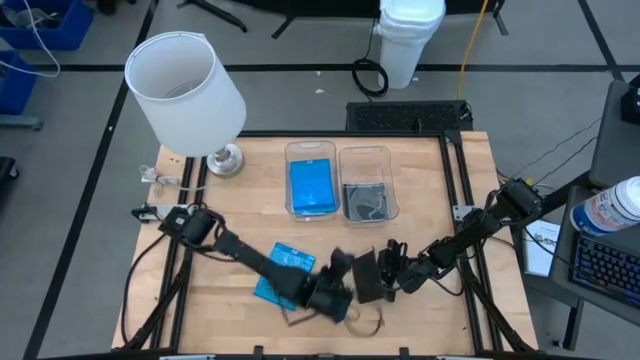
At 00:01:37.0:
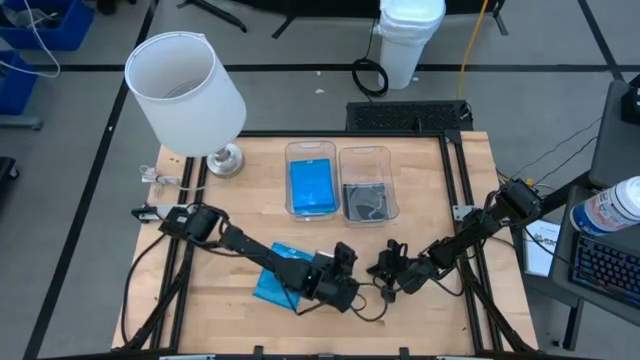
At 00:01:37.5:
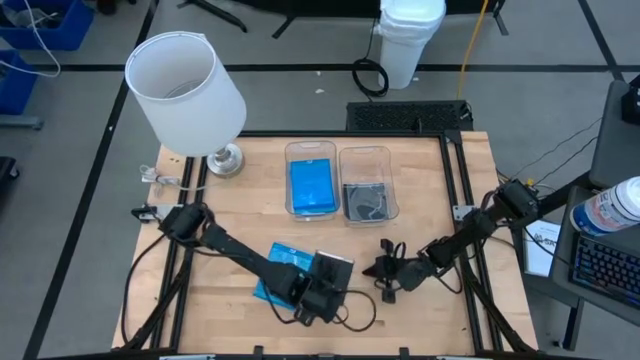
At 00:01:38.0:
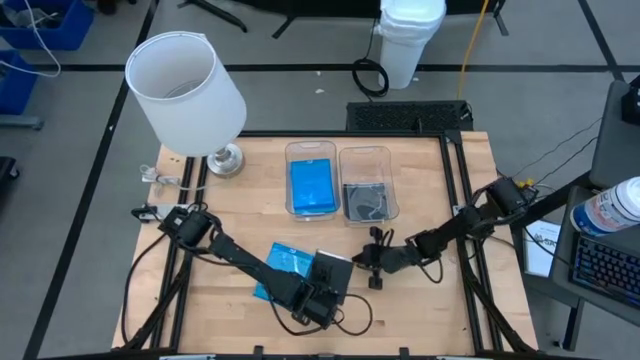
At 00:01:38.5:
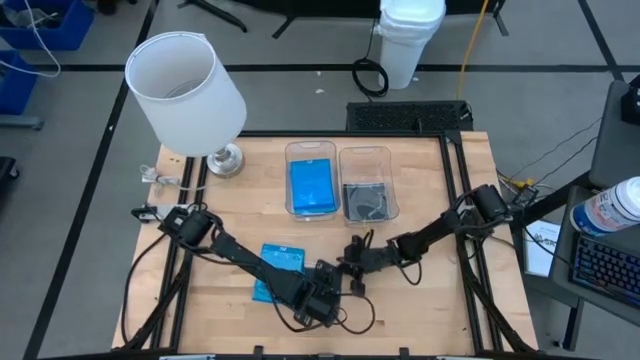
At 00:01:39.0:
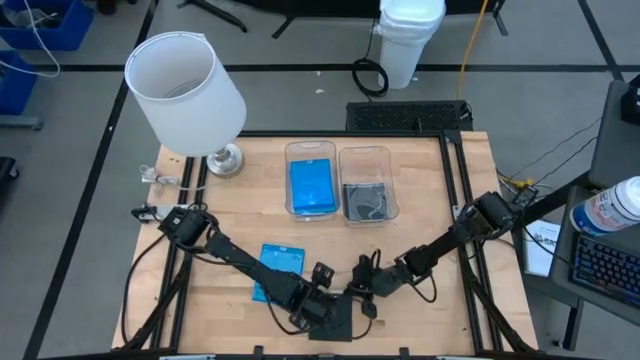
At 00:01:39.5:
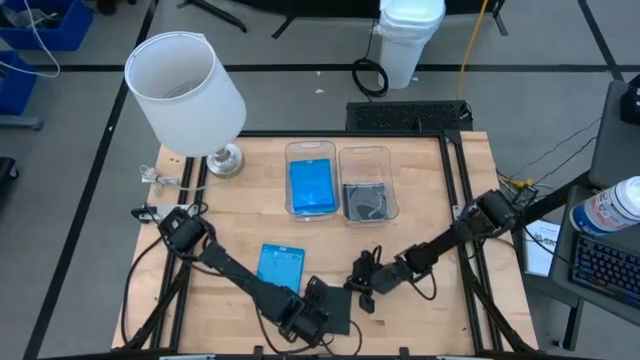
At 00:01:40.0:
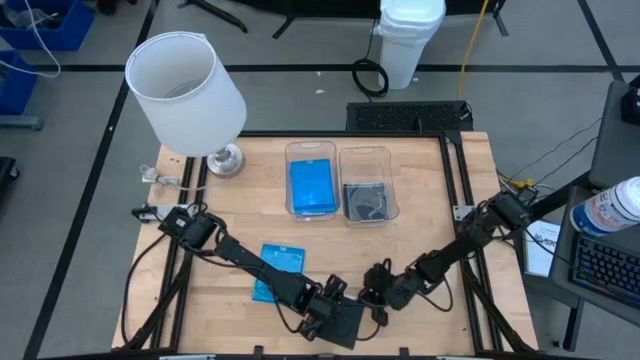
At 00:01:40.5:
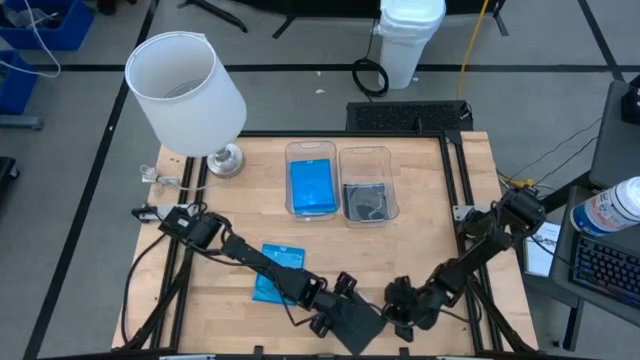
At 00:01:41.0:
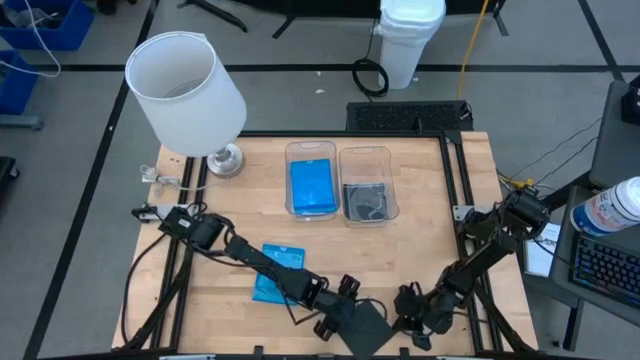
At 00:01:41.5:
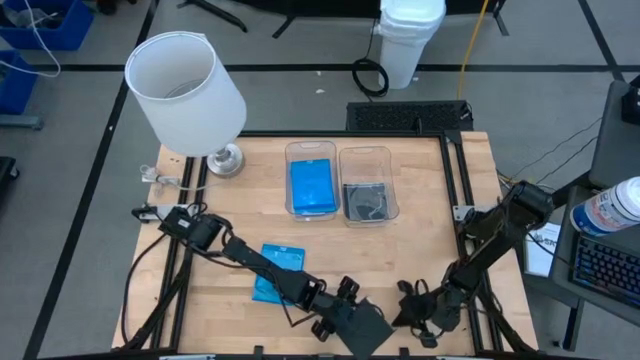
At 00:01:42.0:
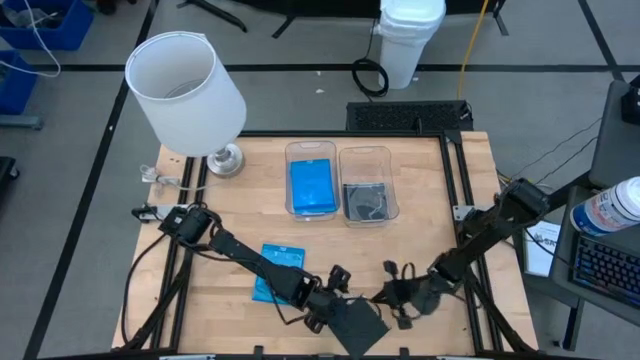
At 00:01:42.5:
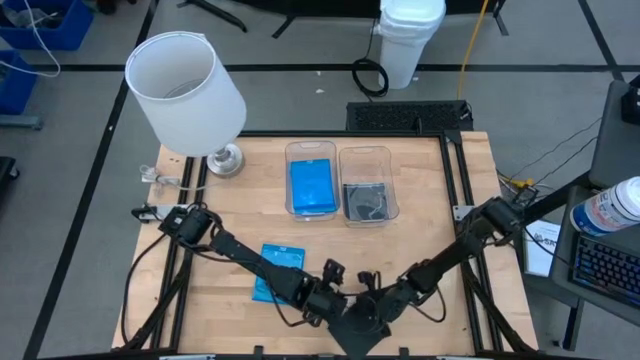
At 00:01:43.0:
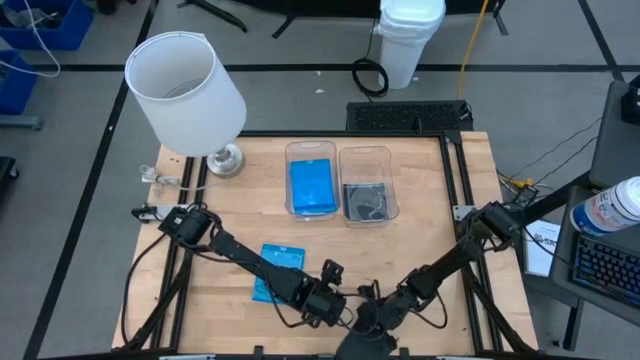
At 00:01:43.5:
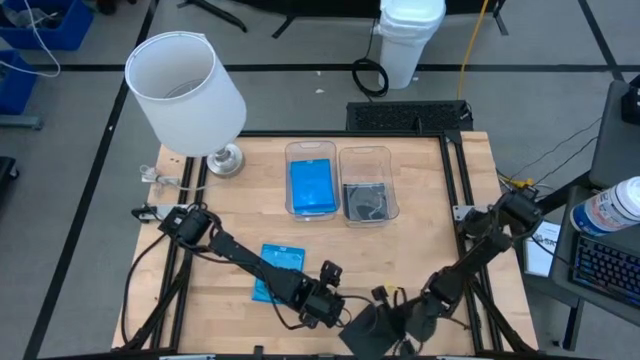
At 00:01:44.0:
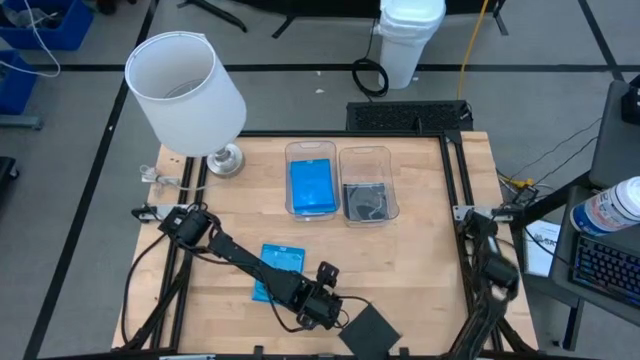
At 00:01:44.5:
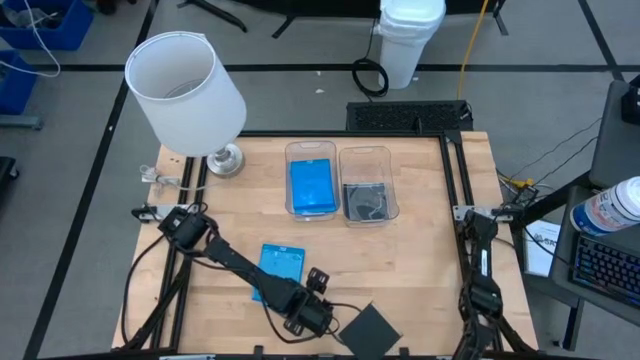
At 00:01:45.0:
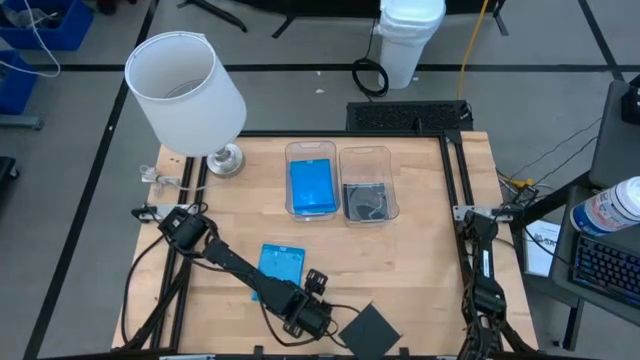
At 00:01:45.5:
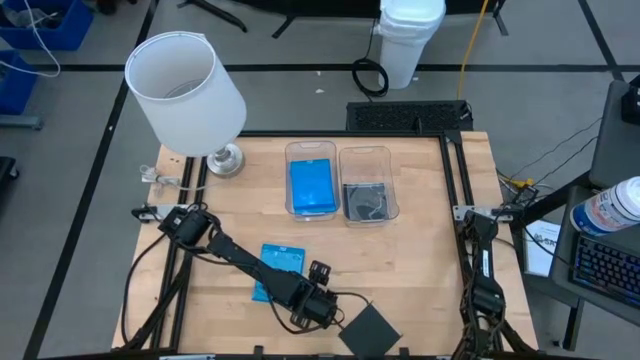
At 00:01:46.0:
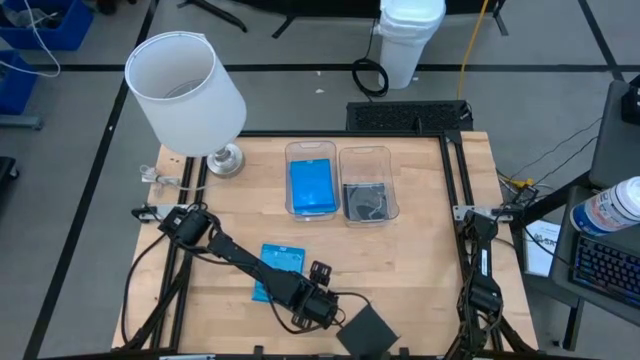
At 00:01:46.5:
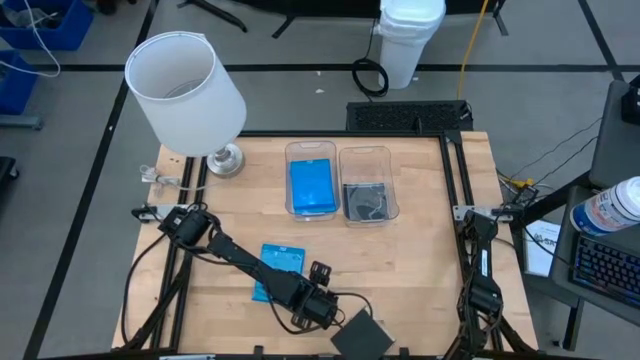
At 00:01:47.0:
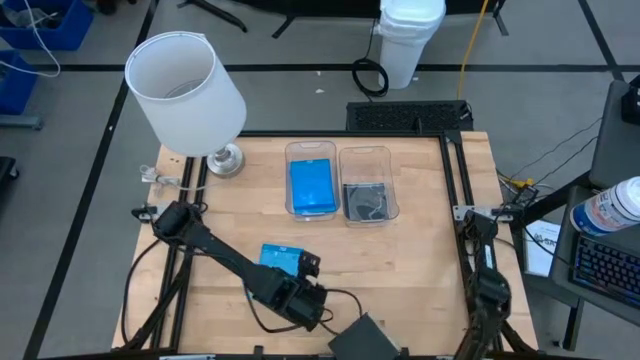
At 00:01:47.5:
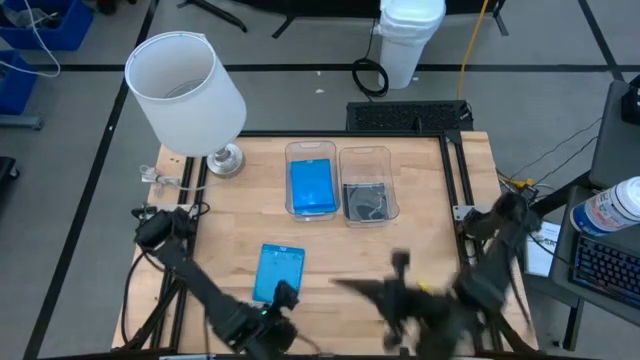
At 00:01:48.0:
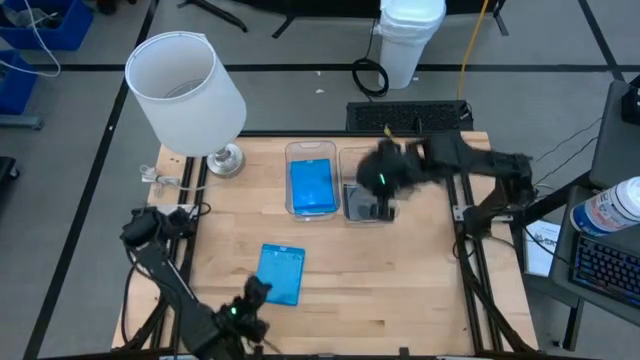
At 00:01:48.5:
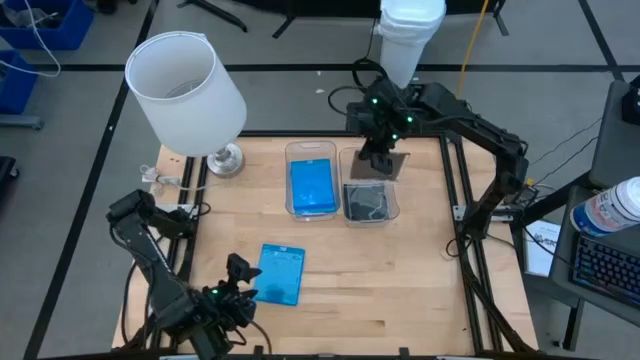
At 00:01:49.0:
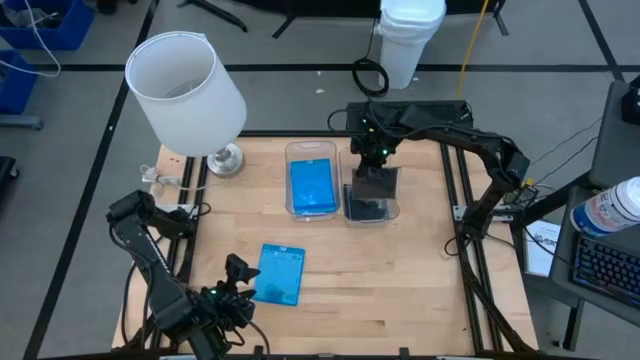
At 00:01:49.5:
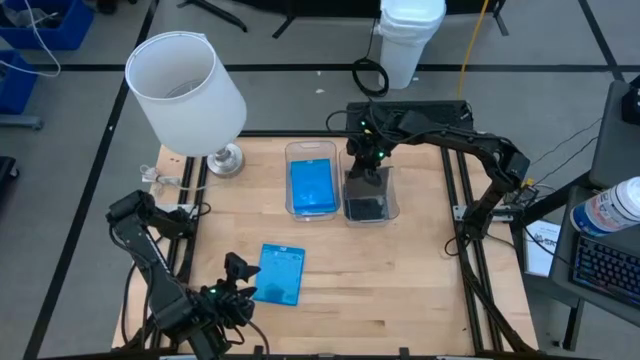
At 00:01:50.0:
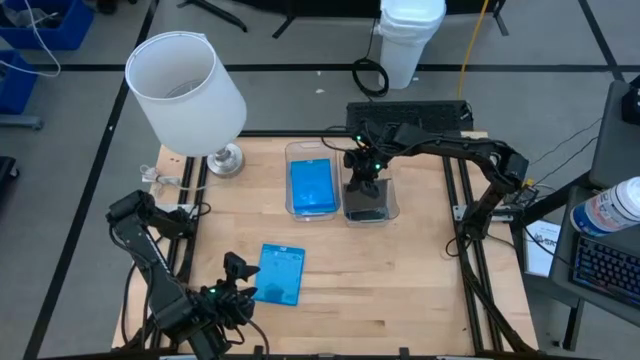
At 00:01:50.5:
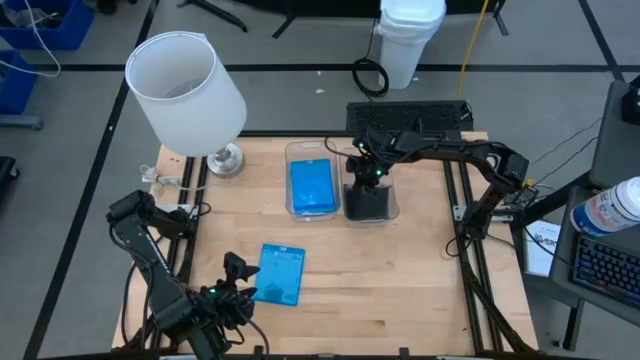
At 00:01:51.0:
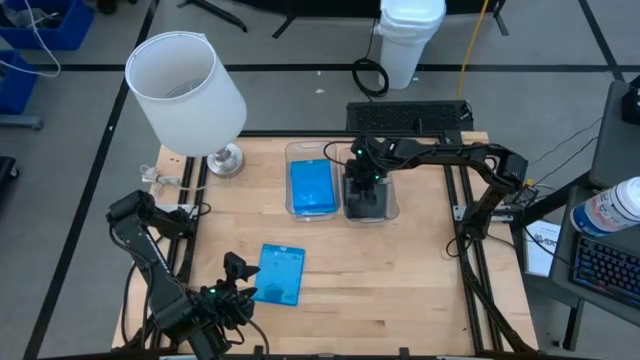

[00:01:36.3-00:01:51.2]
Task: Pick & place jewel cases by type
Stack the black CD case on top of the black CD cases in the right transparent bin

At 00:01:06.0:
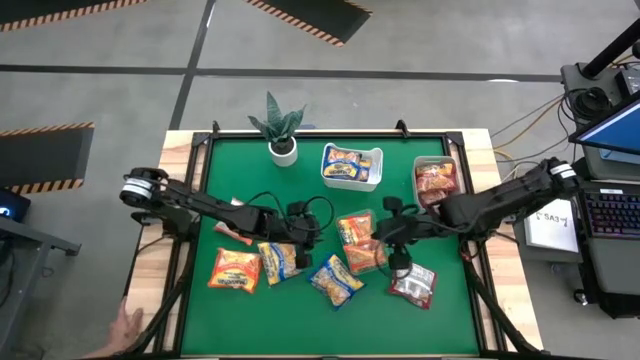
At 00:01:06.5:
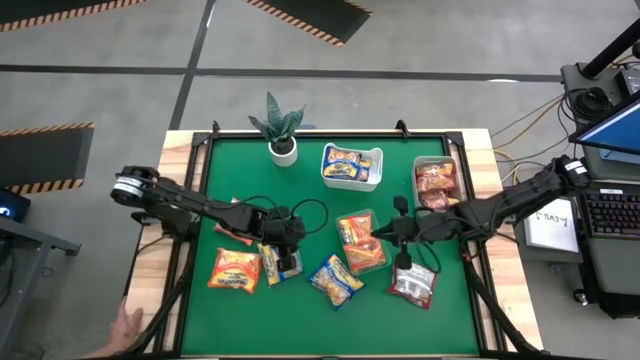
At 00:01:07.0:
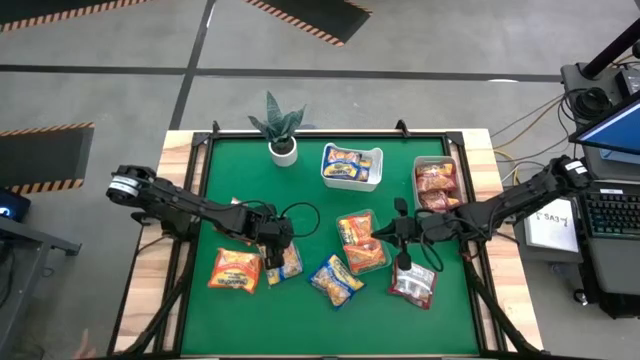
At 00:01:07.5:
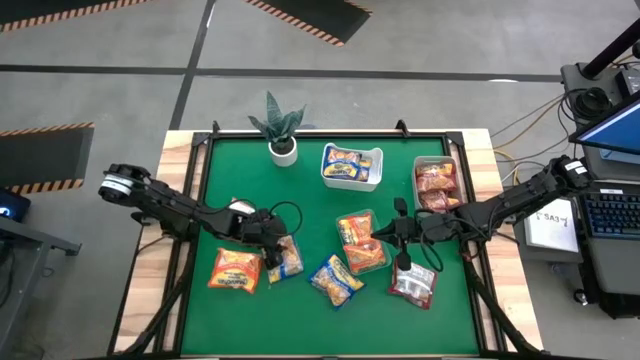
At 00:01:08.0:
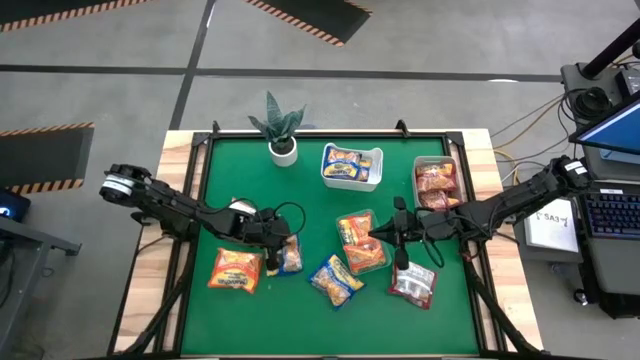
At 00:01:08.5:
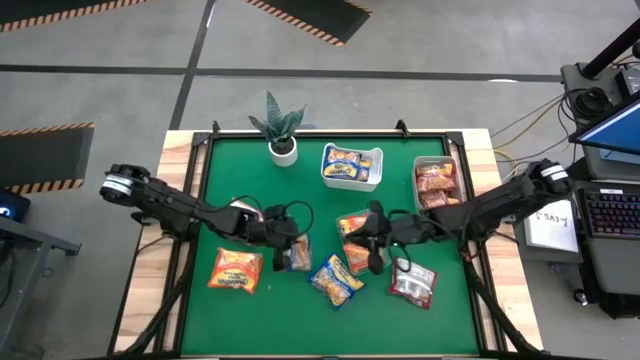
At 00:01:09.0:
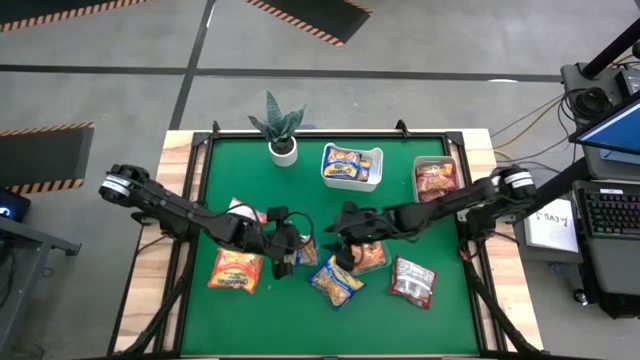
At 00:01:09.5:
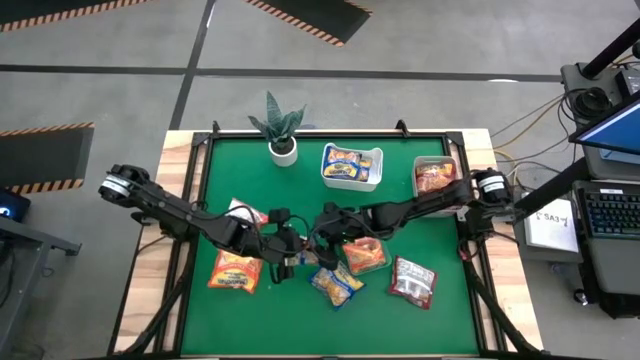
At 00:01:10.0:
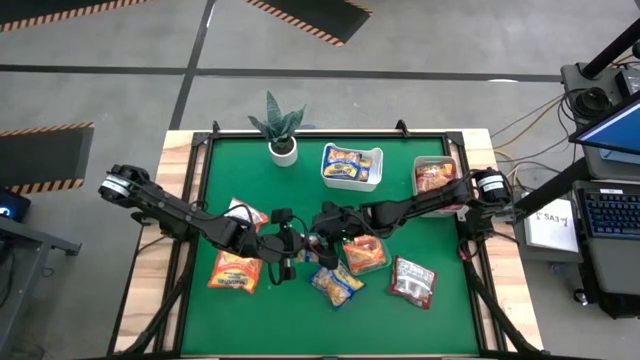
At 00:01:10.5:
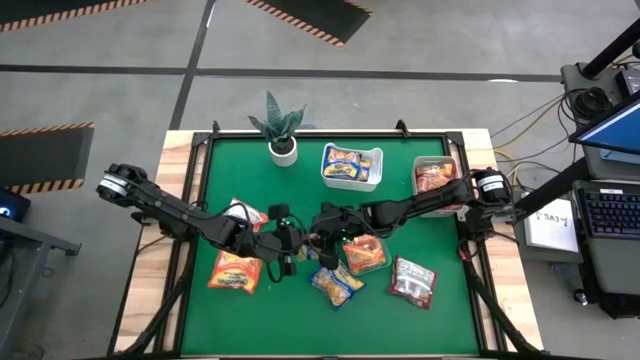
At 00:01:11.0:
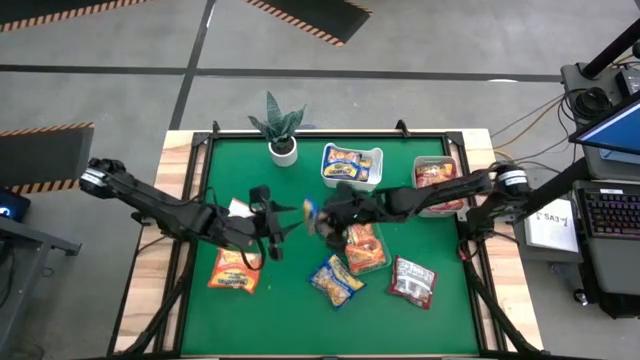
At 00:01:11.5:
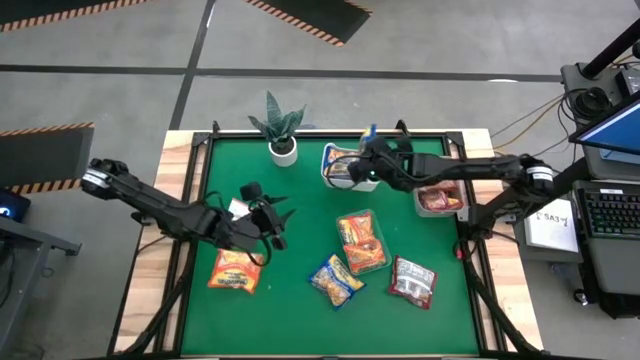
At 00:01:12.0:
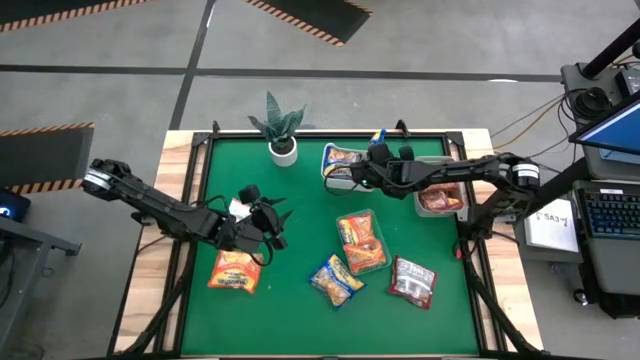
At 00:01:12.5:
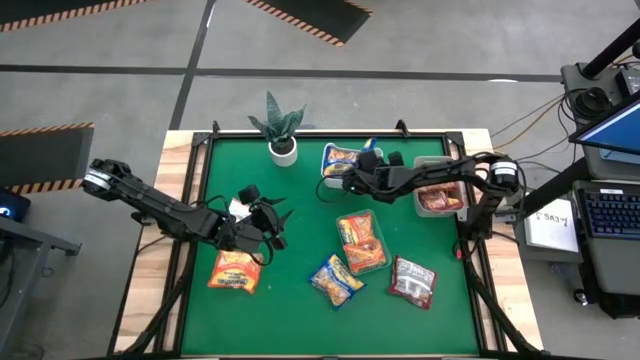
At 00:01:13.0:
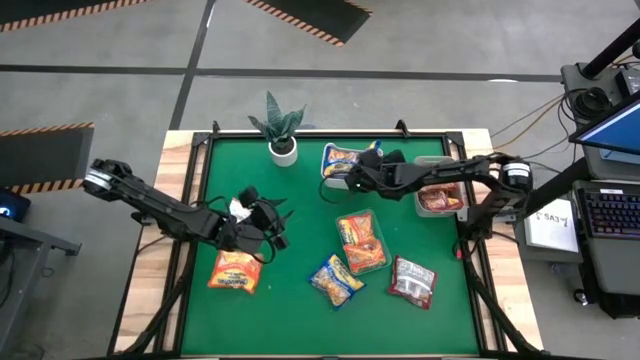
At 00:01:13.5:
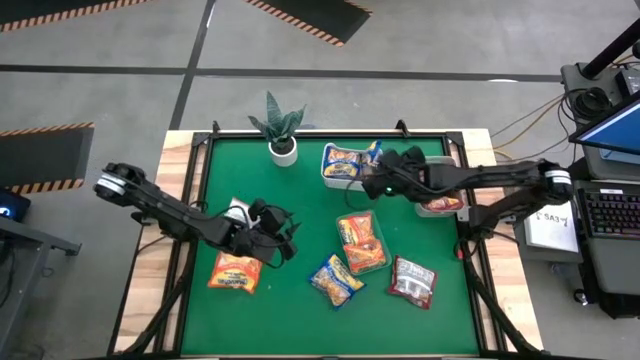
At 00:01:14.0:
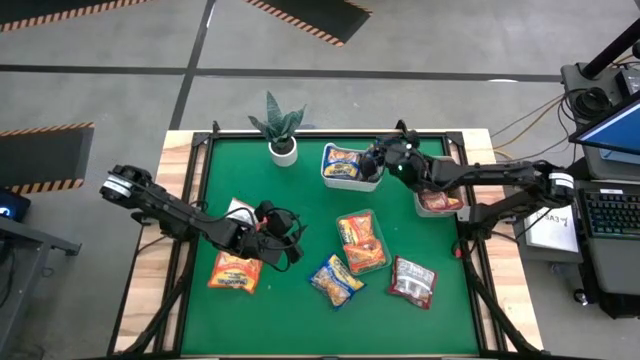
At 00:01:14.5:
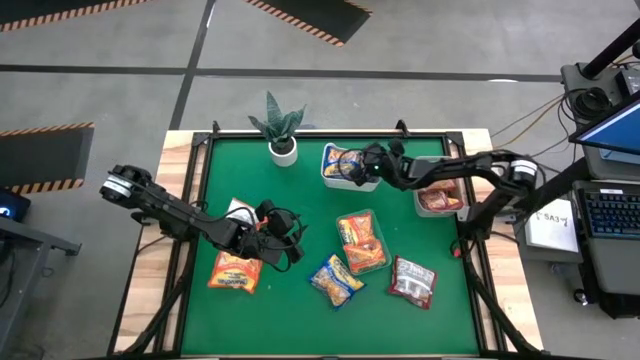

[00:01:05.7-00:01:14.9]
Task: Sort Maruchan noodles
Put the blue noodle pack into the white bin
